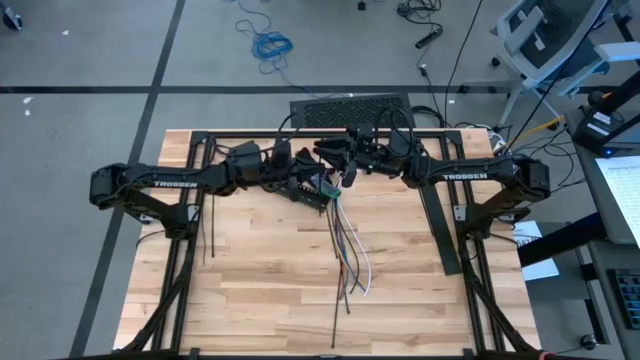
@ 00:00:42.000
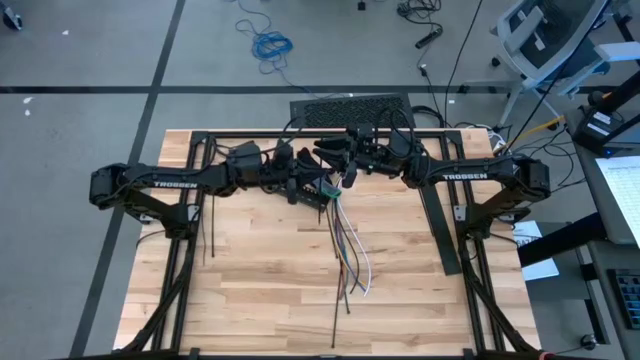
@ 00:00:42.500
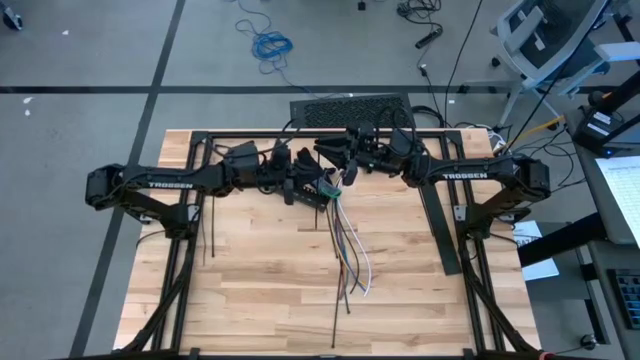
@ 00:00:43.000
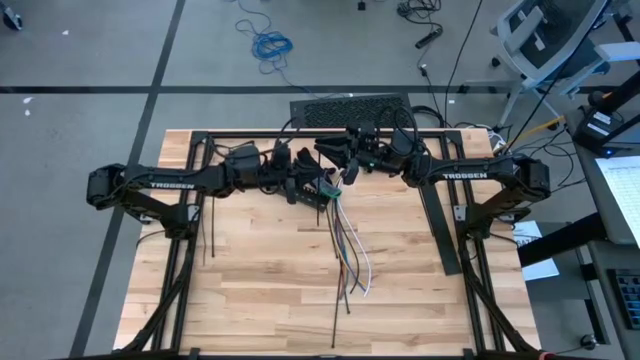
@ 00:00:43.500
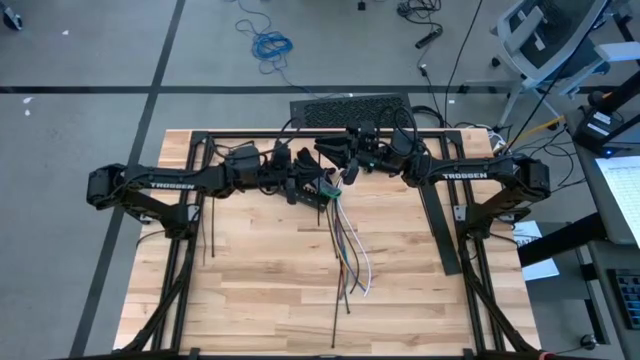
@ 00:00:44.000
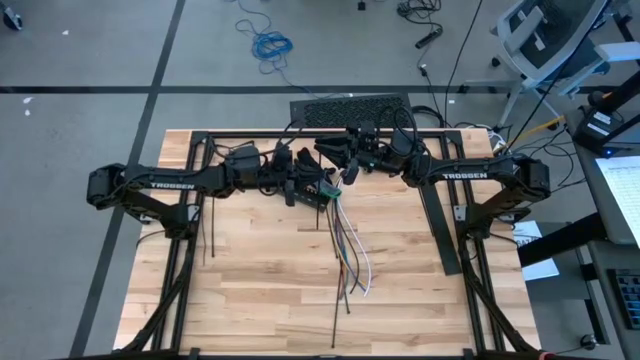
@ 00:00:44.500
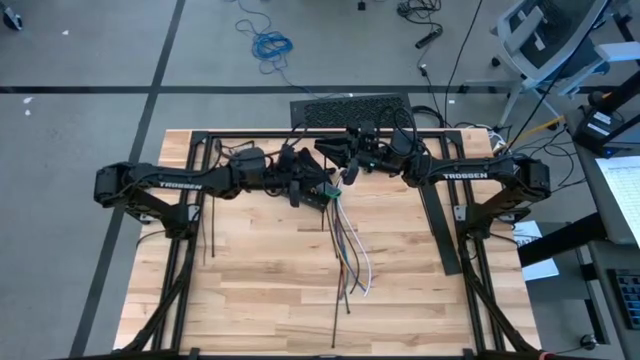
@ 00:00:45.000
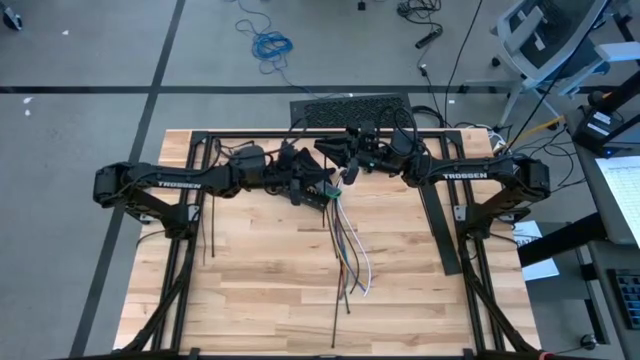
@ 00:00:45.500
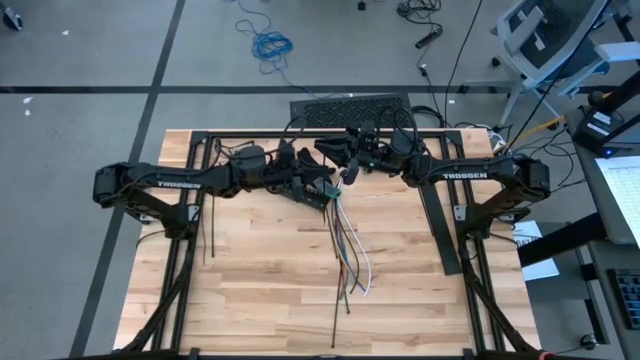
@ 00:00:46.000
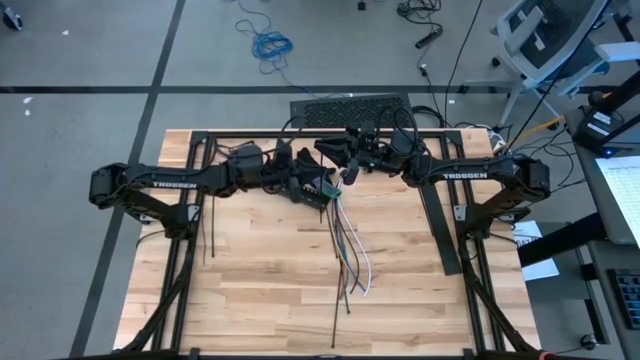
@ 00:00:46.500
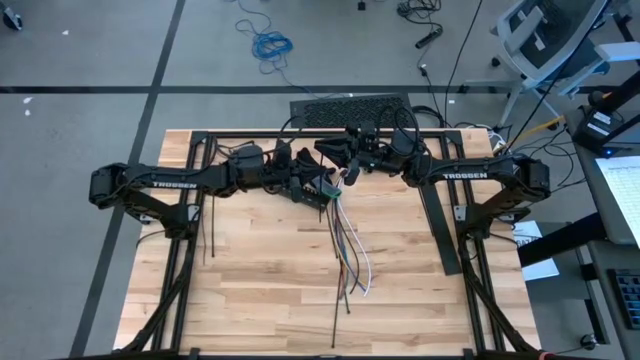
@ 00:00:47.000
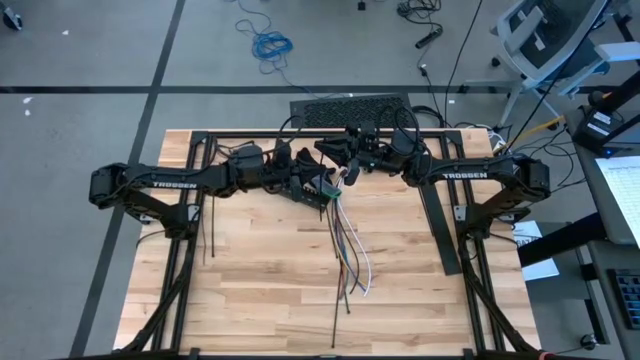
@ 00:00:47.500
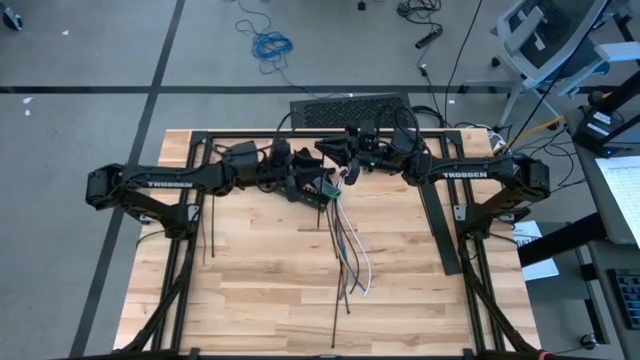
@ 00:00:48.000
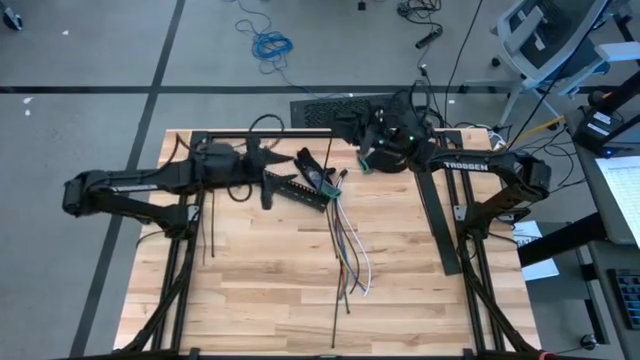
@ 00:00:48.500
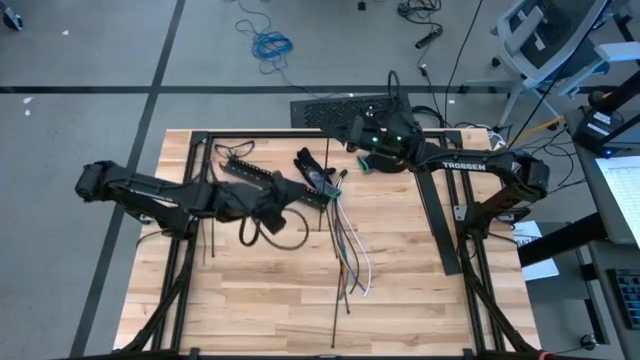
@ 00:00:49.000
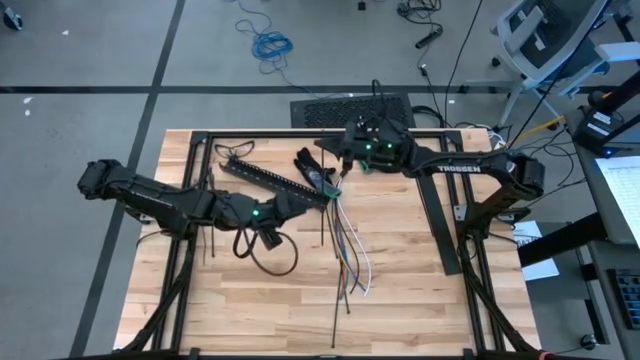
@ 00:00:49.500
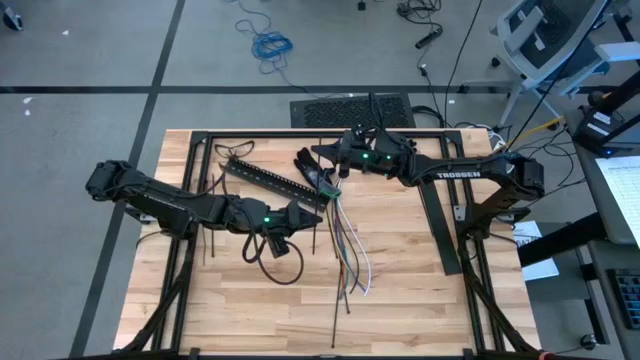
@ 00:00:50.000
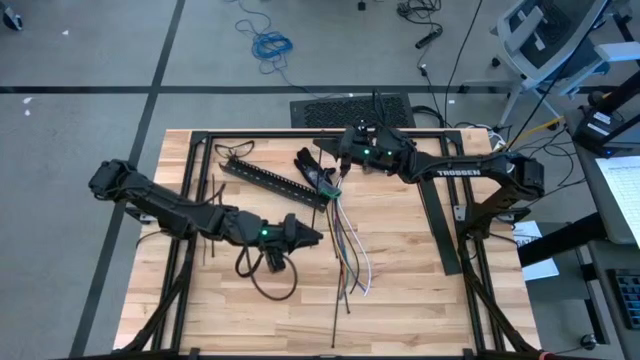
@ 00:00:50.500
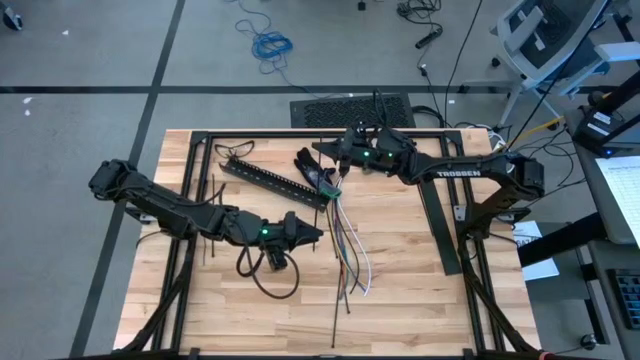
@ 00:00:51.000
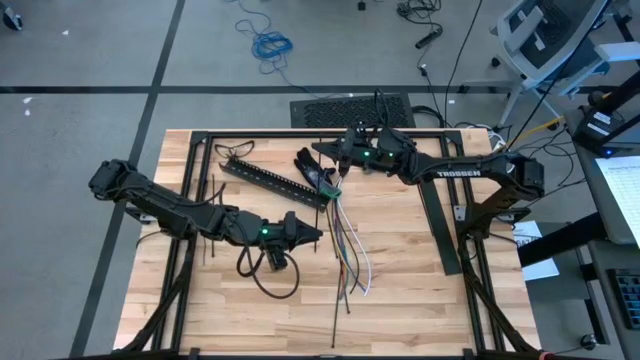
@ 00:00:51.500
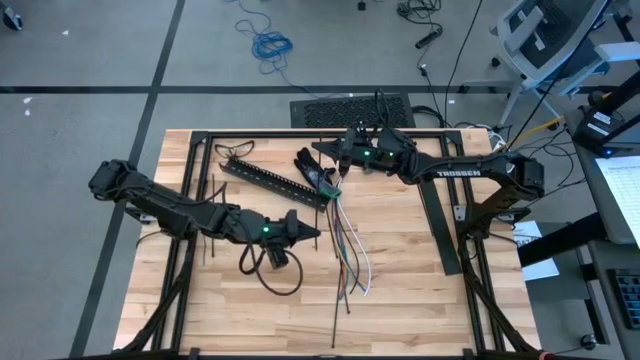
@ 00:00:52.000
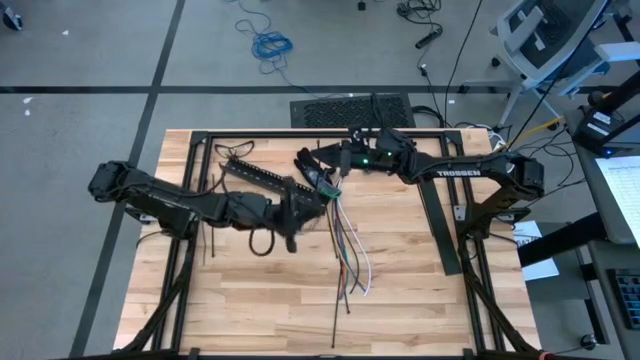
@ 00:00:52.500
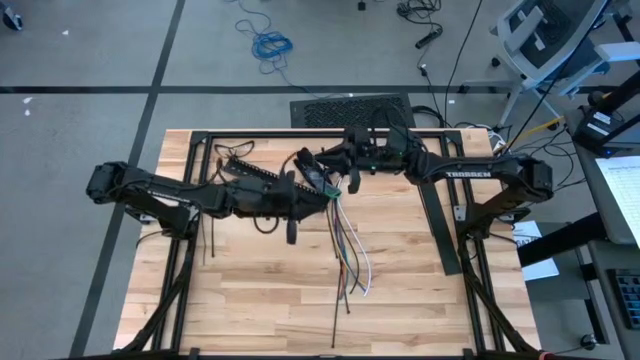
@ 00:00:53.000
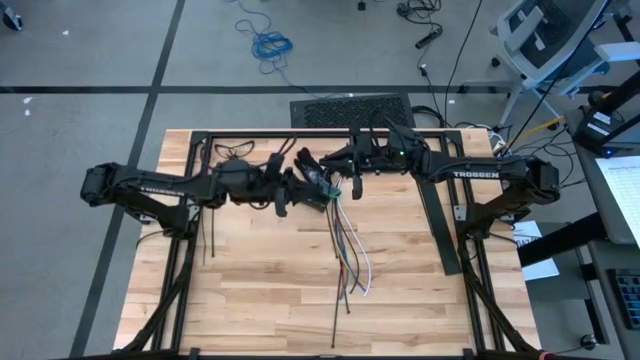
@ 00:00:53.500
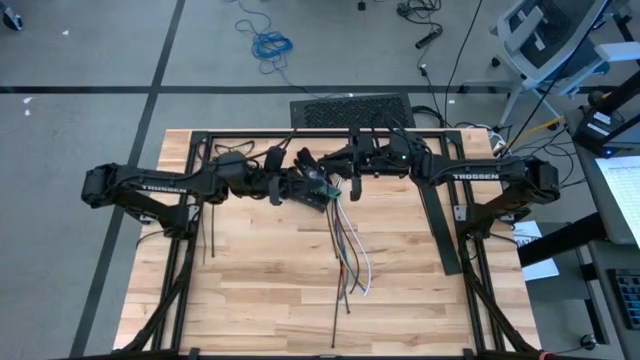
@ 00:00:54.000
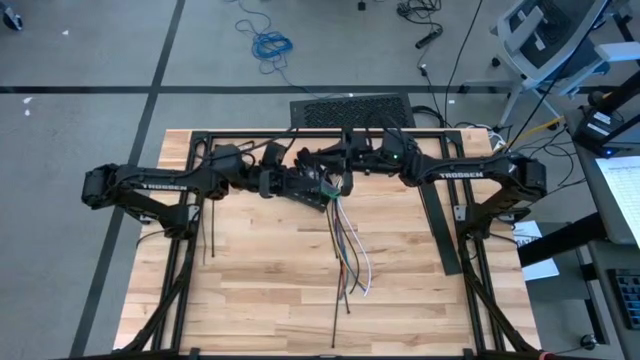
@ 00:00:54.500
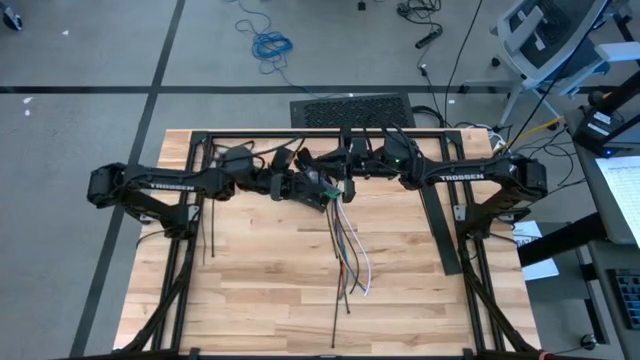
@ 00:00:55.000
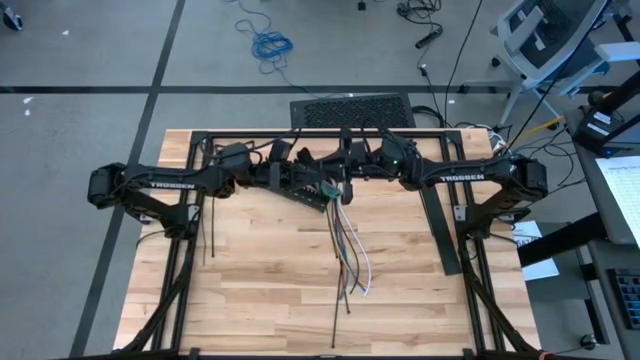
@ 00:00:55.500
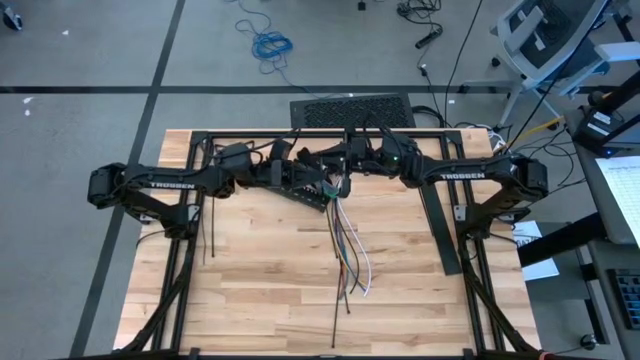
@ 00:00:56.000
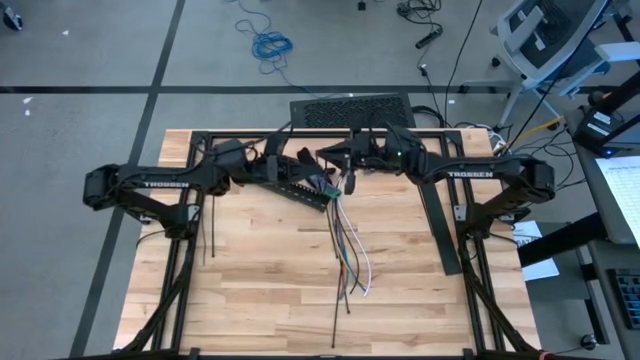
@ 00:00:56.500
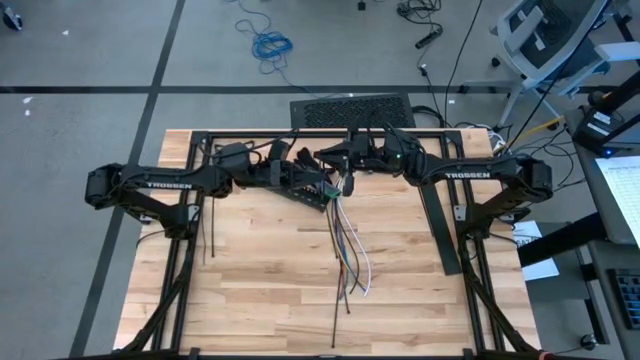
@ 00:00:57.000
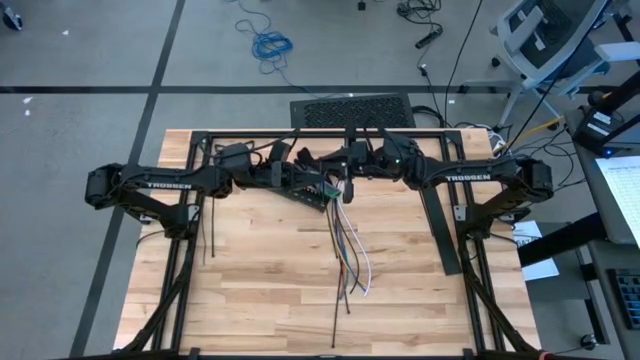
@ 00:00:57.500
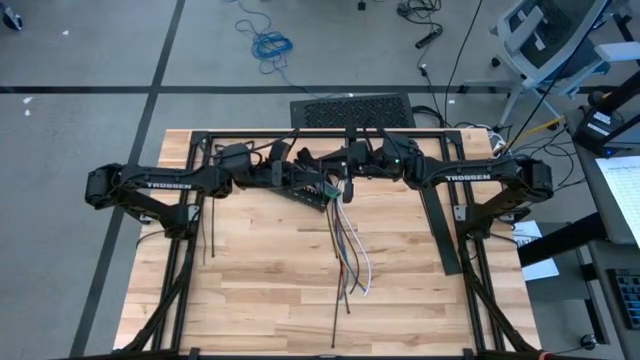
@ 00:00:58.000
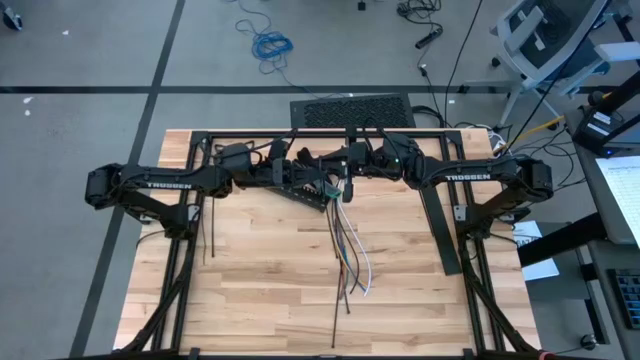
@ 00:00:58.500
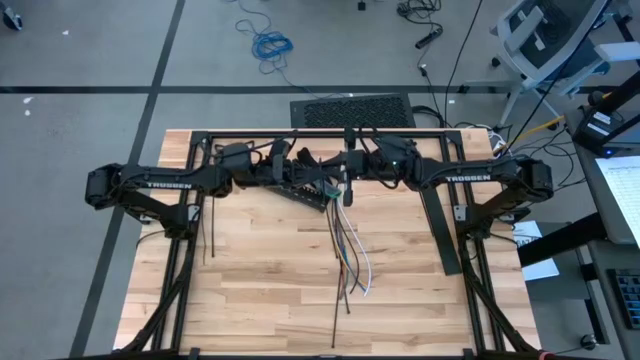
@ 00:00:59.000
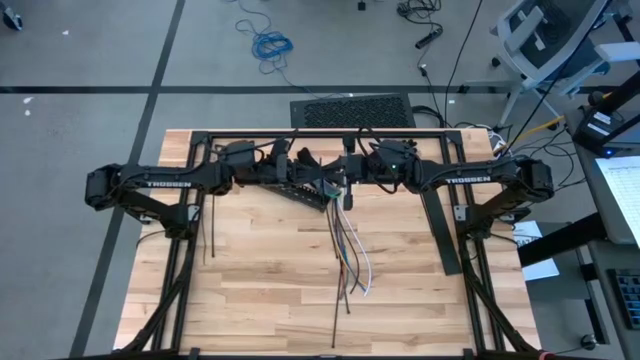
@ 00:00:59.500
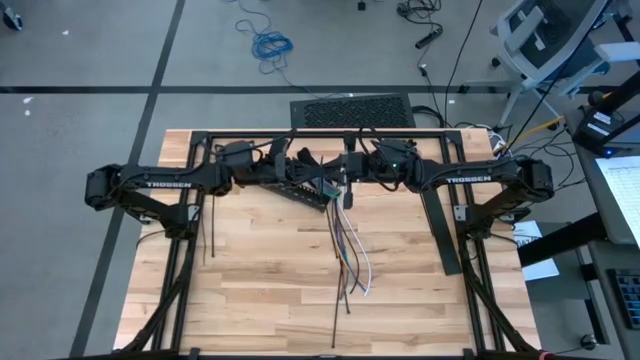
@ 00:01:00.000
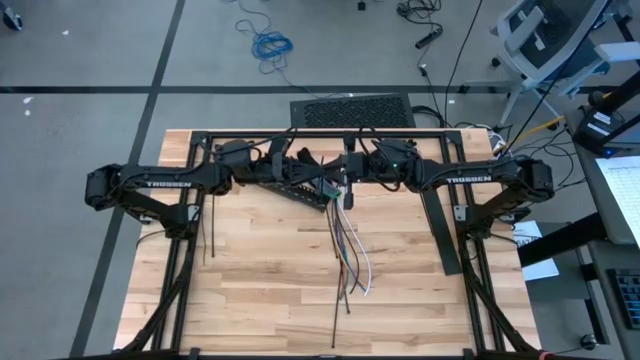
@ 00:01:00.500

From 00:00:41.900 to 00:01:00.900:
Task: Ziptie cables
Insert the black zip tie into the lock head

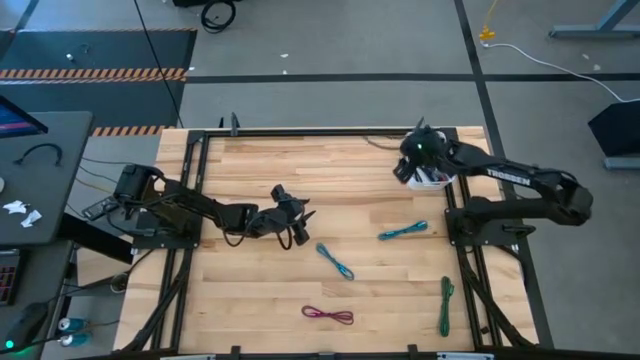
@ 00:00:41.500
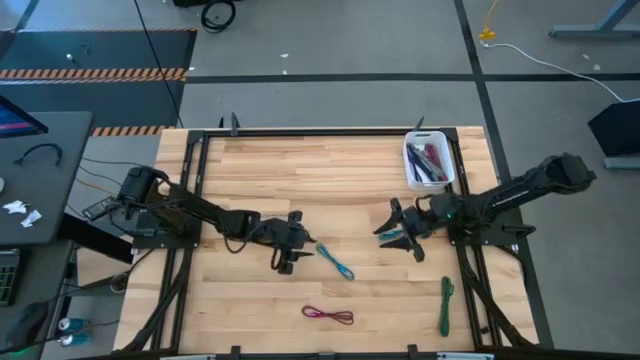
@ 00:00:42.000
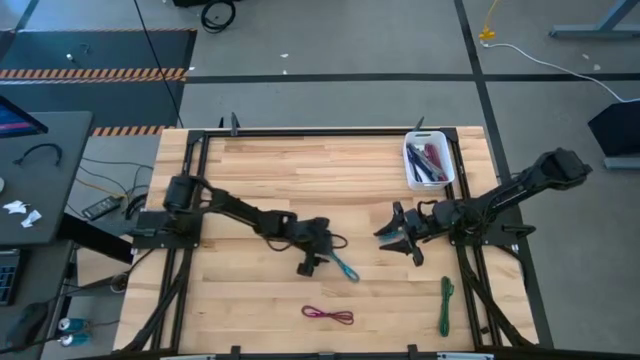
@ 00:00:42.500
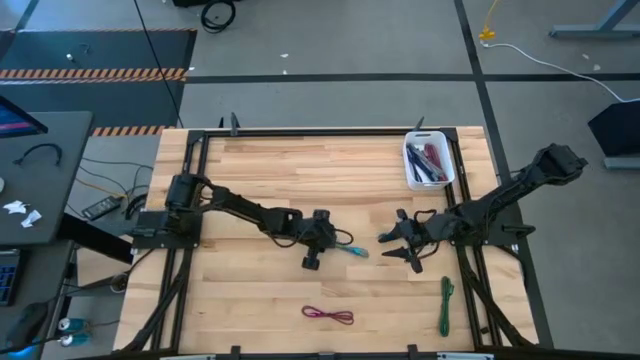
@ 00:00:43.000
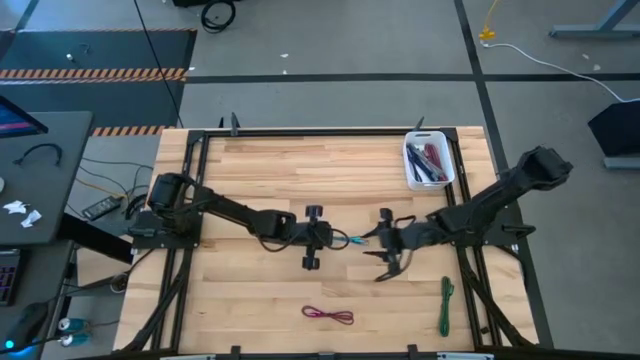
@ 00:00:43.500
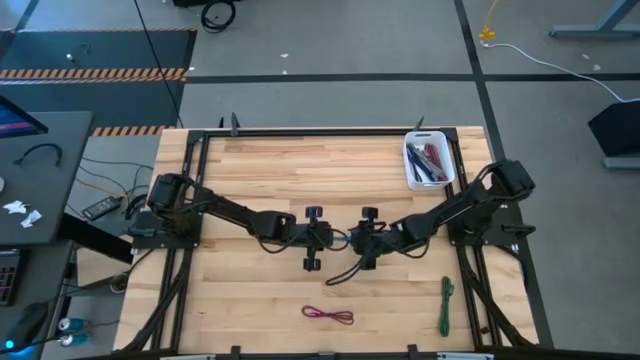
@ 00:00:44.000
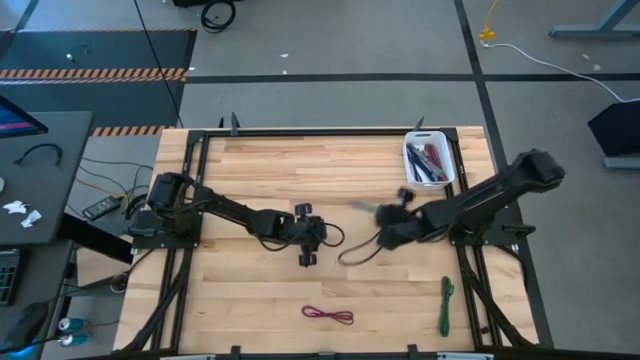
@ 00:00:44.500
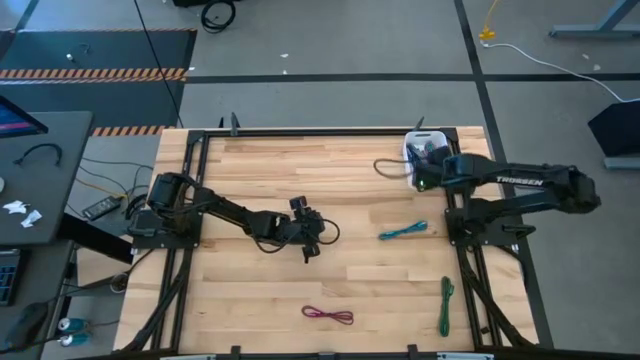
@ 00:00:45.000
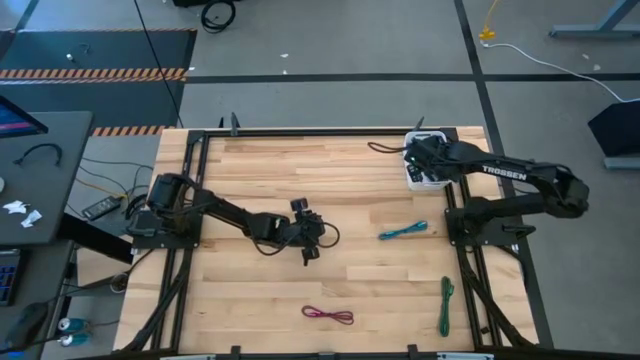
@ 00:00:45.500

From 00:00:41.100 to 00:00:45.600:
Task: Pick and place USB-C Cables
Put the left black blue charger cable into the bin
